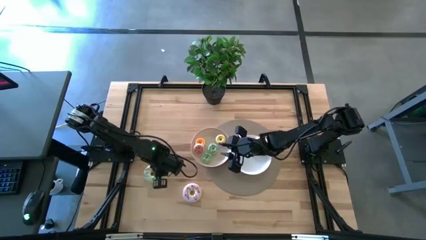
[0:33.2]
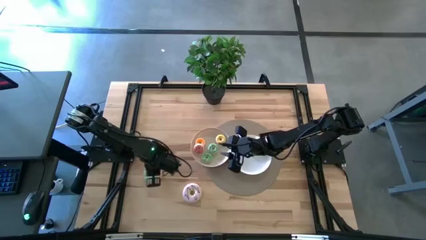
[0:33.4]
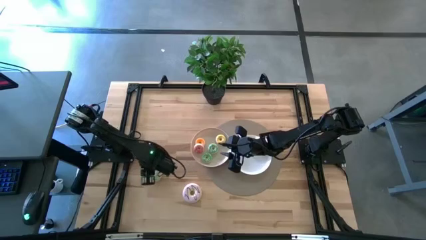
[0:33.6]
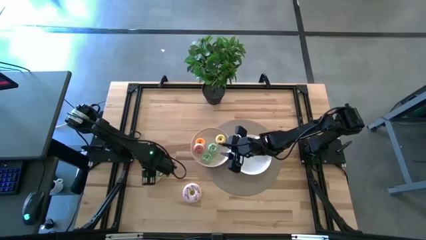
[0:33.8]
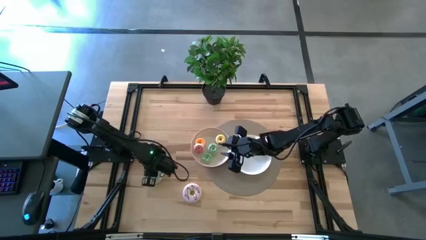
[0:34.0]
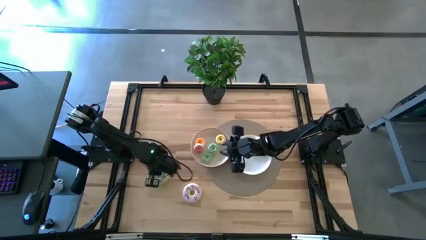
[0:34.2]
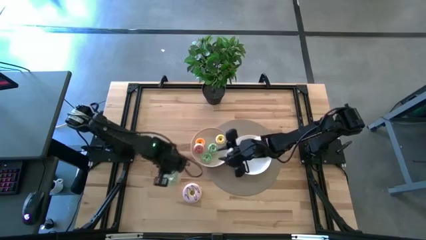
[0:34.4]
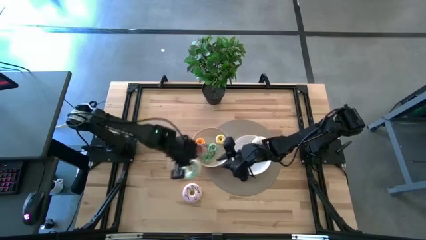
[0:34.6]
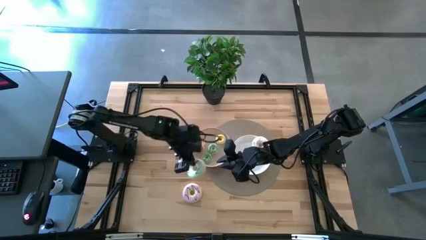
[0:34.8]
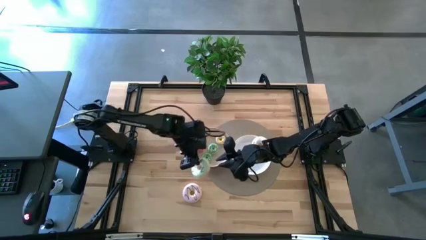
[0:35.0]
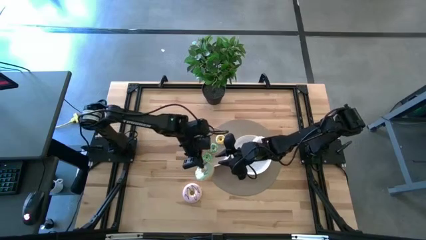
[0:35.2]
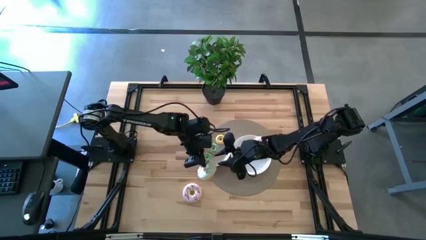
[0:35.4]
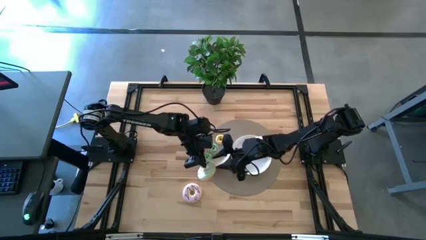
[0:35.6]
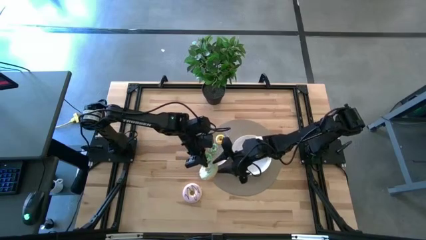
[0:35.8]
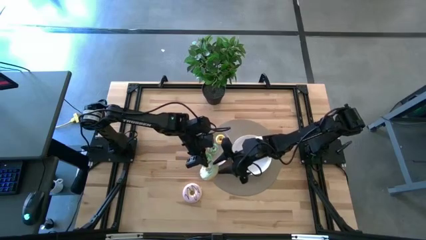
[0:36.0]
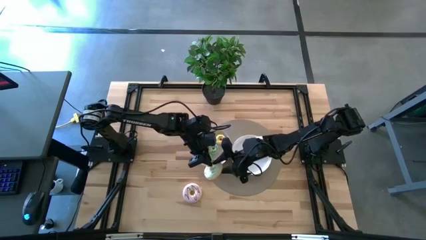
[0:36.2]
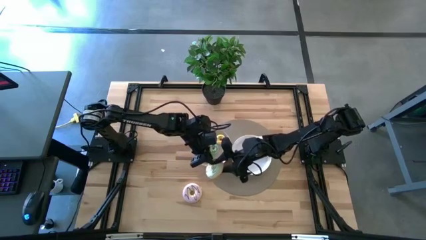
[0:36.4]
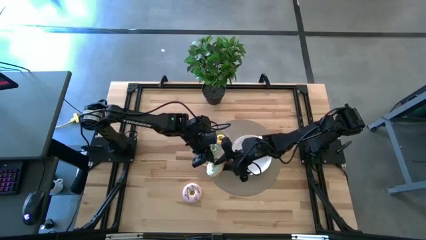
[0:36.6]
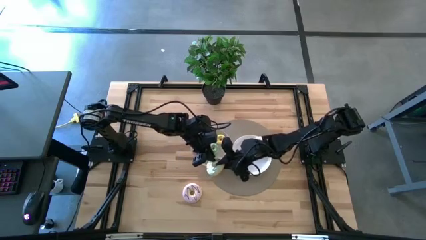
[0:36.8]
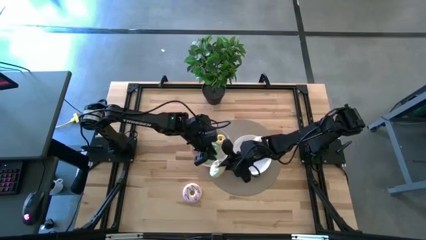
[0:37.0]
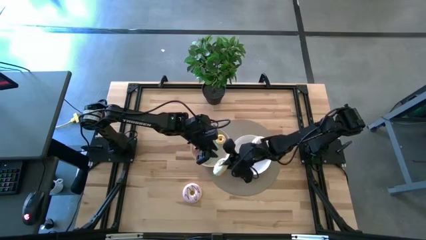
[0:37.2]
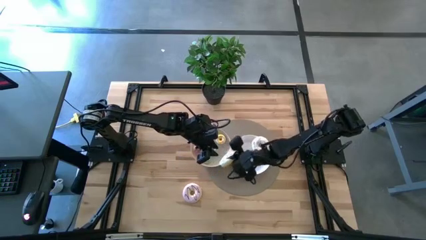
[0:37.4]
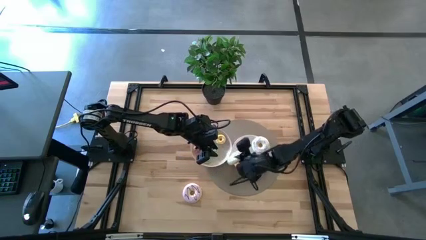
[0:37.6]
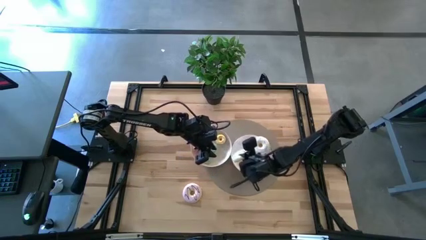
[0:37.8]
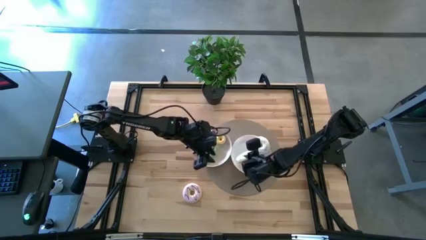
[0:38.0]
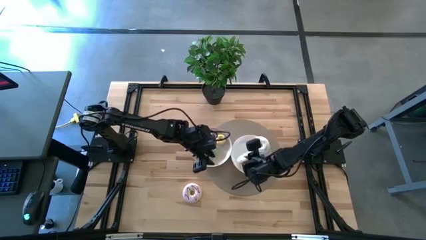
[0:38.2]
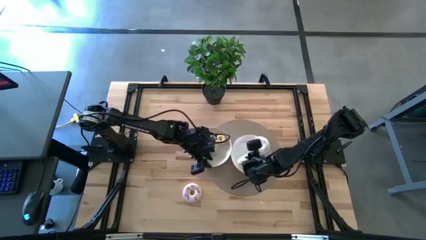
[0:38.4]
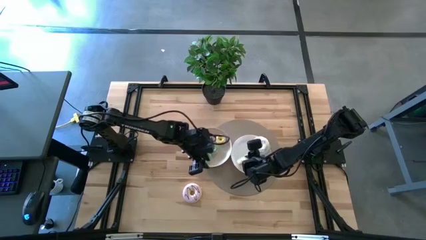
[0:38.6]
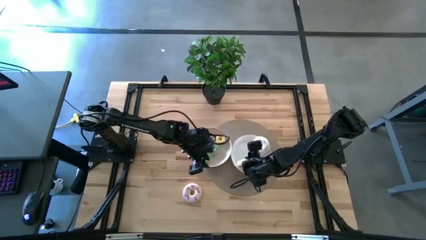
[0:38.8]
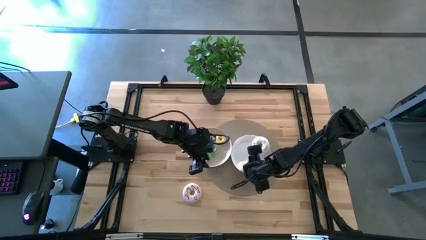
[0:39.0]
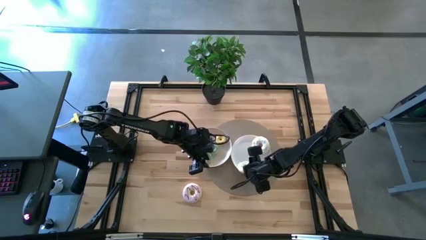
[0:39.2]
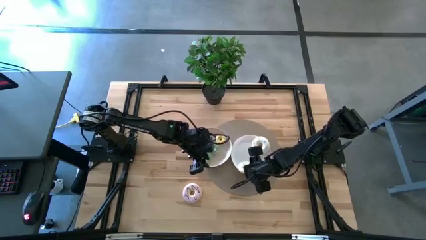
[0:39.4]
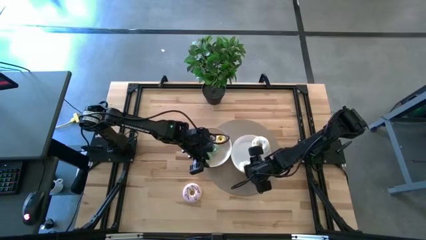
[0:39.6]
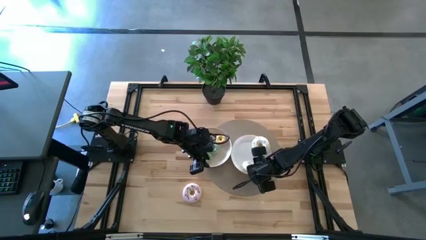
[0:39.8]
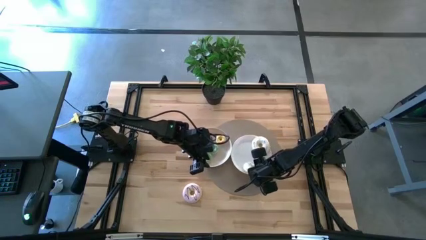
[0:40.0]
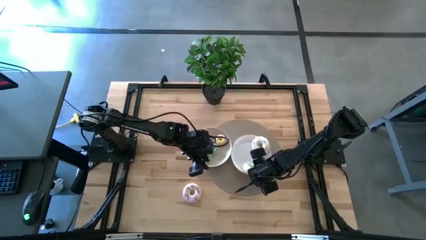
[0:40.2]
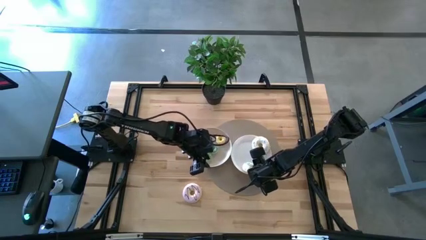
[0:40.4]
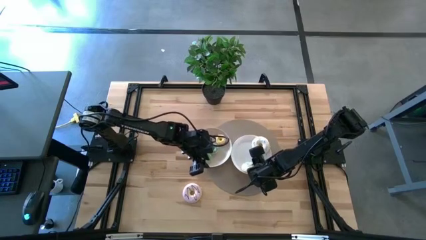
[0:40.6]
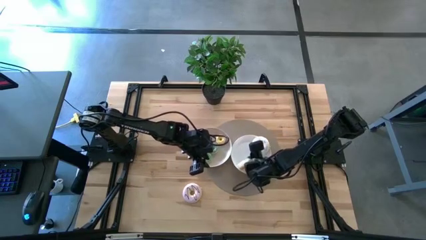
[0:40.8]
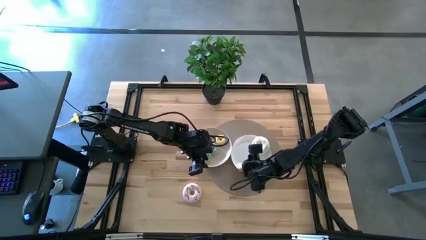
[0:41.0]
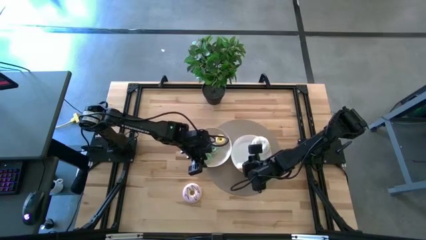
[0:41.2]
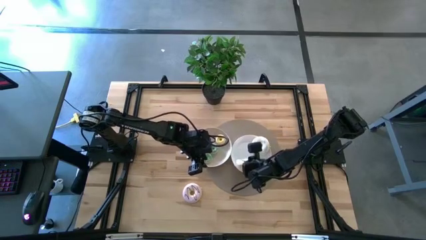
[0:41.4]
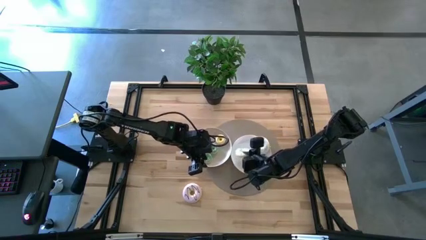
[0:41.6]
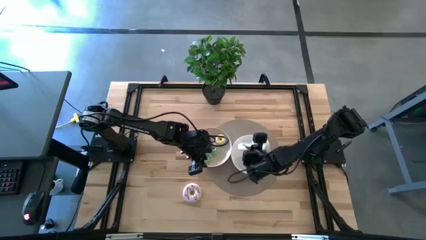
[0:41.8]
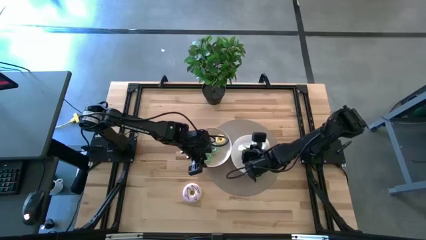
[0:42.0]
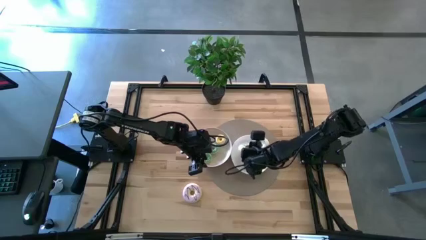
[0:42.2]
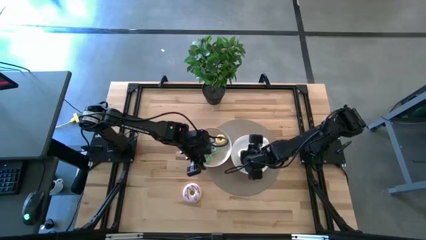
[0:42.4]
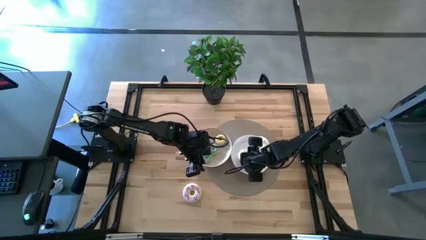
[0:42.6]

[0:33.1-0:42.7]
Task: Pick & Place donuts
Put the big light blue donut into the right white plate

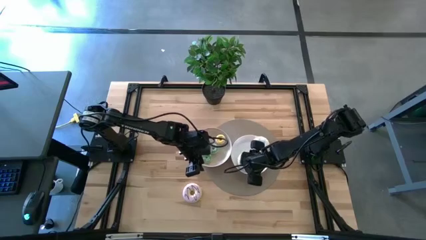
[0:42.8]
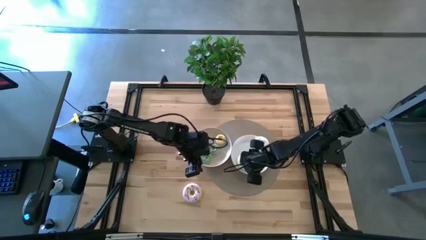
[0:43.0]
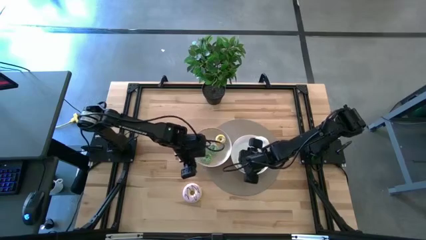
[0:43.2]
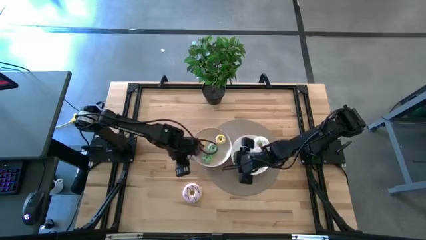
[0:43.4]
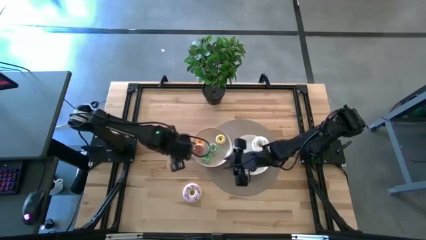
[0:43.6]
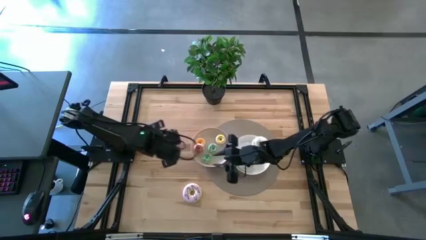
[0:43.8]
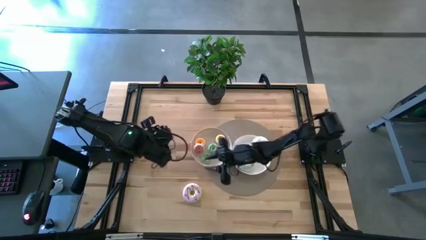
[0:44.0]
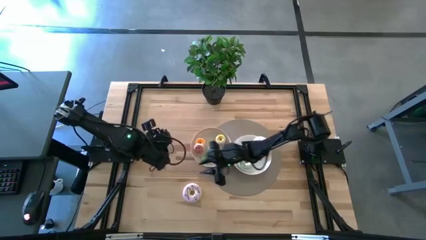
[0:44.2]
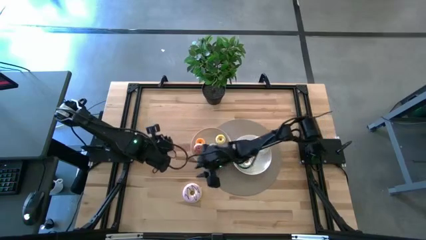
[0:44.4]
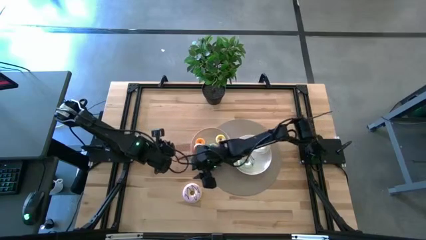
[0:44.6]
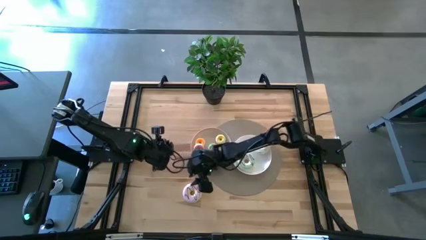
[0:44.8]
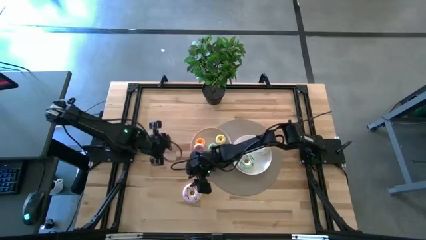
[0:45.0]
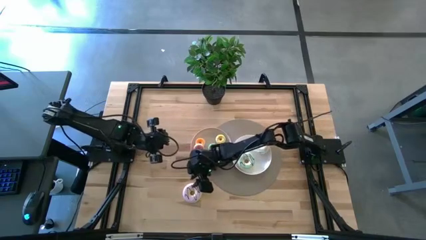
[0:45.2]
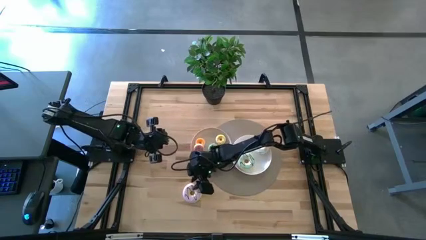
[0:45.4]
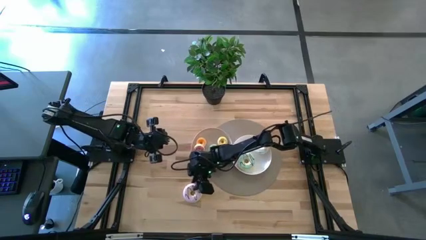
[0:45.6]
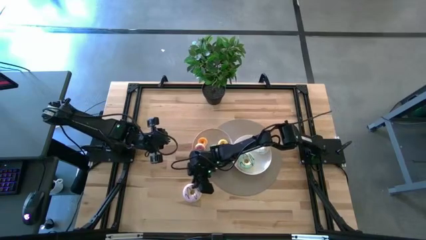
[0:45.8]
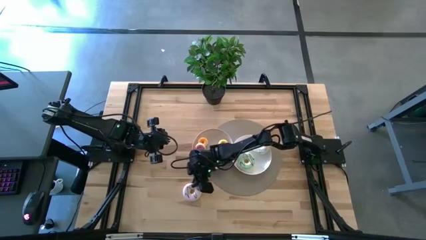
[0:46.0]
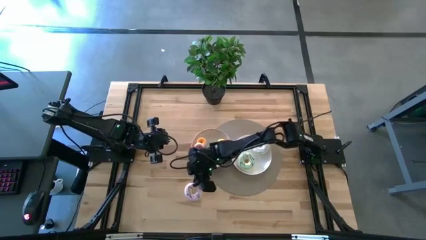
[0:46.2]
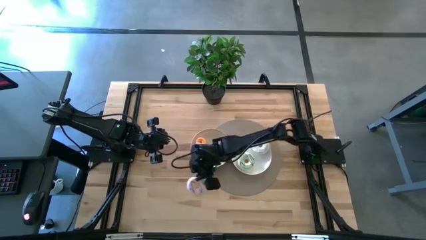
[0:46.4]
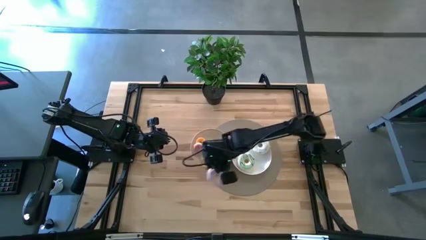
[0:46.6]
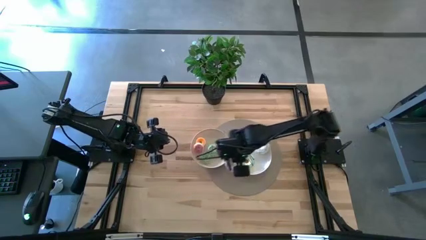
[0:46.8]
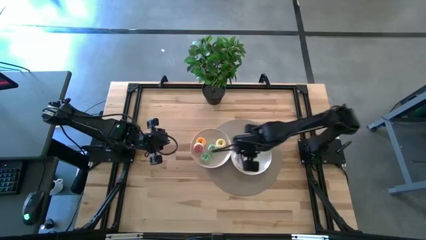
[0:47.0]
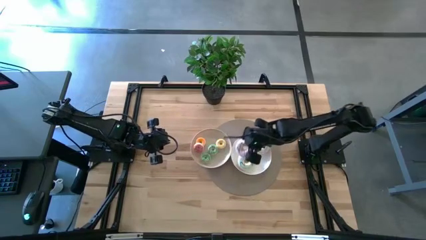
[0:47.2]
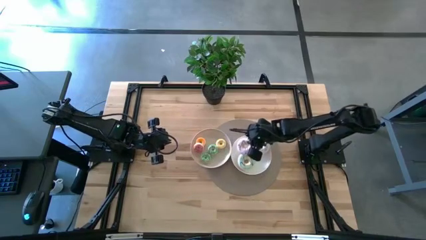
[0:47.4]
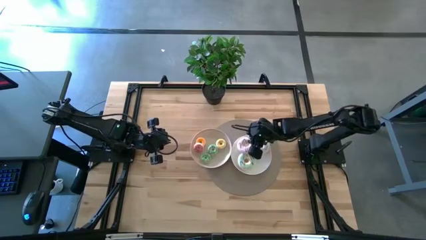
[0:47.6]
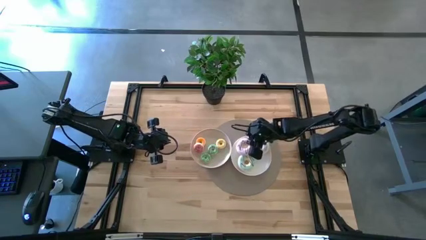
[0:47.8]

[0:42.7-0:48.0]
Put the big purple donut into the right white plate

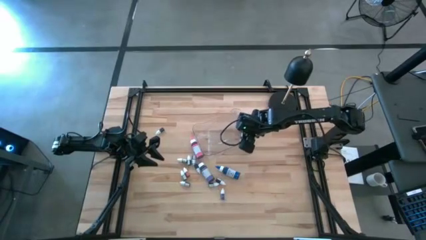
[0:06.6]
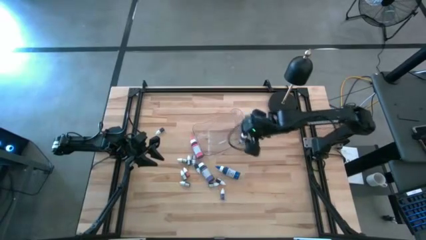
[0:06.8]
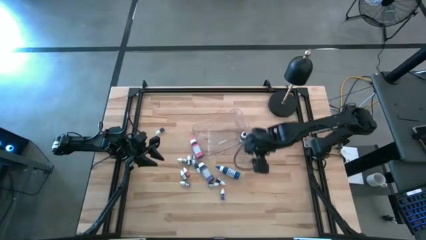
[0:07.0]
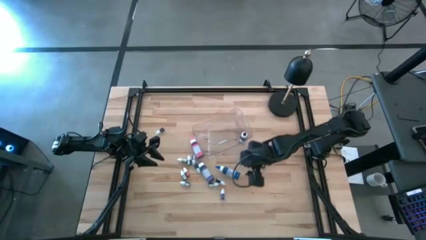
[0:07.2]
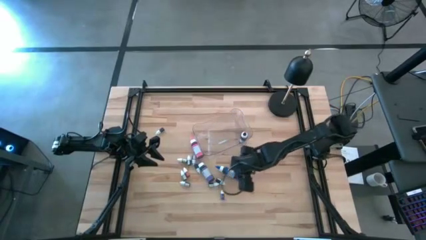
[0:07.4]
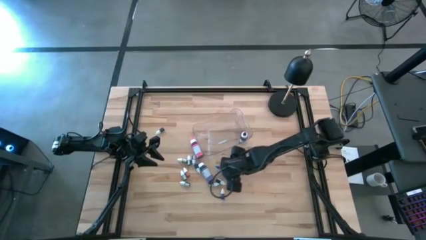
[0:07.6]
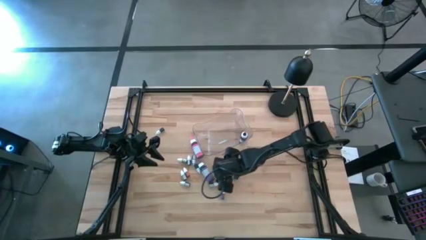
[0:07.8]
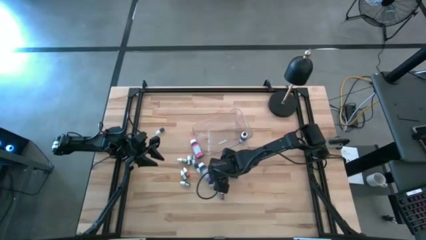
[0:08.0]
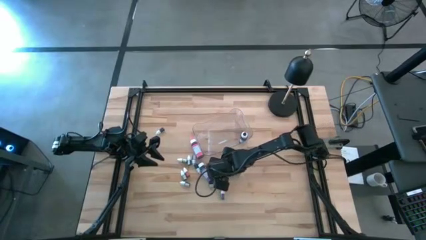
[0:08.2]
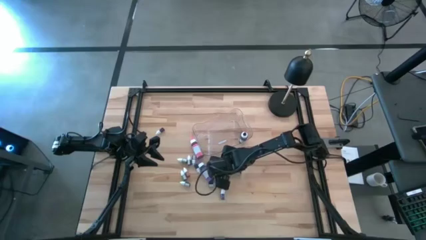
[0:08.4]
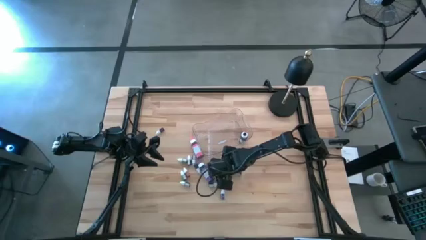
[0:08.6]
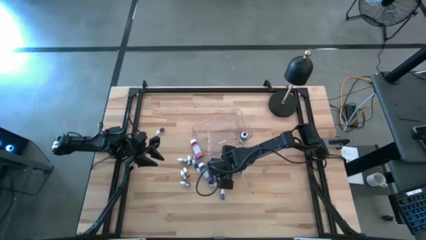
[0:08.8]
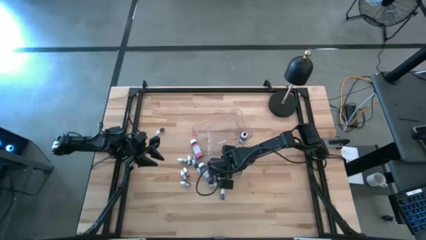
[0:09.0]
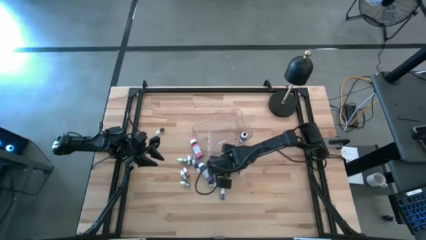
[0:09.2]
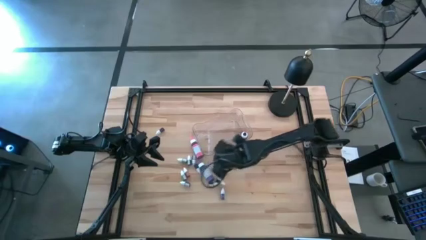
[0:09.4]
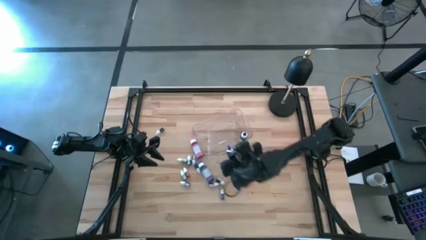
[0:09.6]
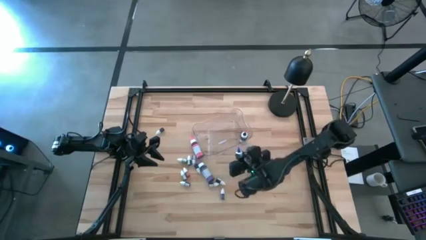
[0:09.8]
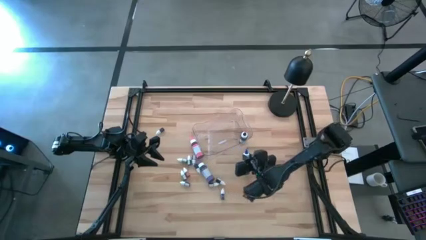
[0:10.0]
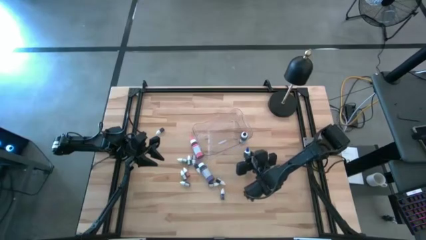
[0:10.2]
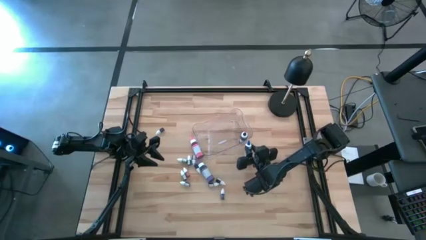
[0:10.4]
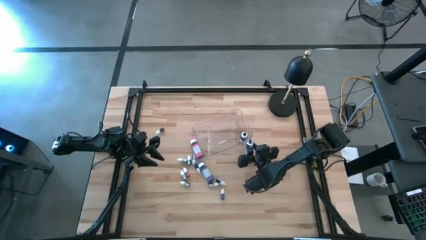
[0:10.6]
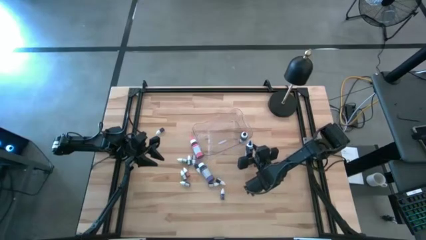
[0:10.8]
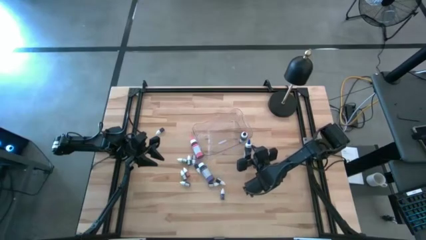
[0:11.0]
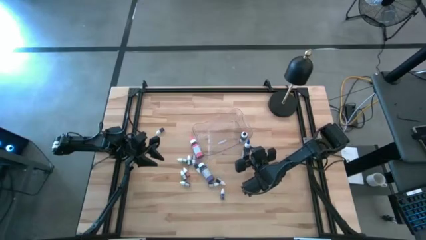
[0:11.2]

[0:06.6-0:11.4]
Task: Pick & Place food coloring
Put the big blue food coloring bottle into the transparent bin
